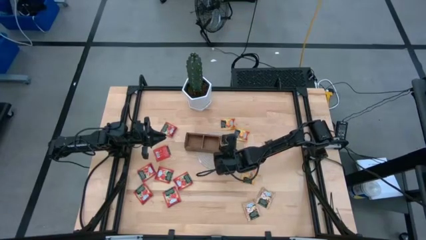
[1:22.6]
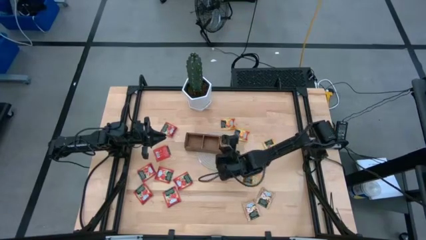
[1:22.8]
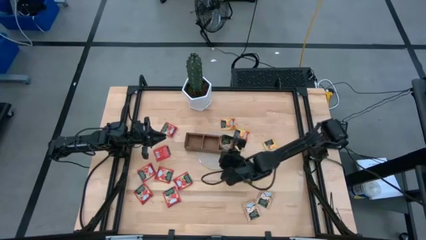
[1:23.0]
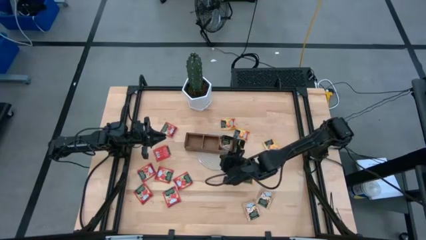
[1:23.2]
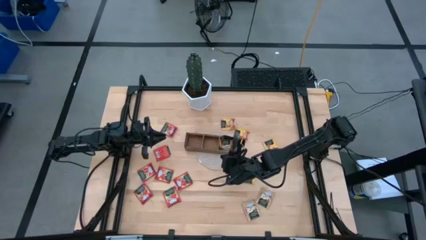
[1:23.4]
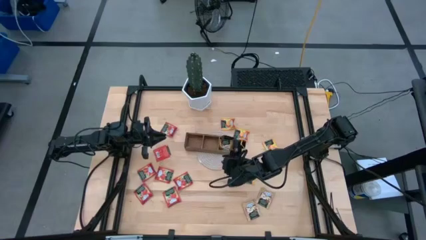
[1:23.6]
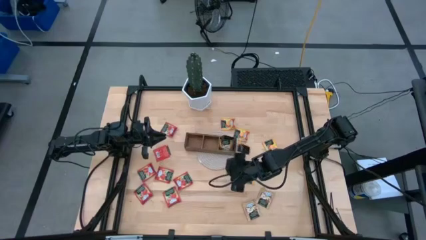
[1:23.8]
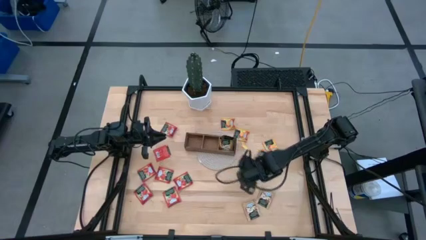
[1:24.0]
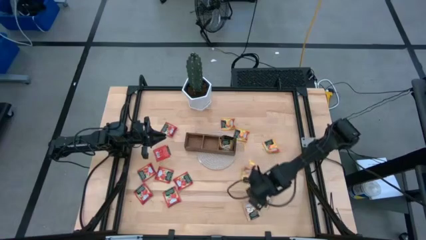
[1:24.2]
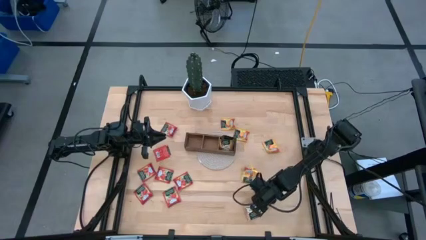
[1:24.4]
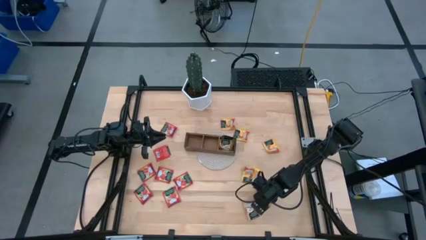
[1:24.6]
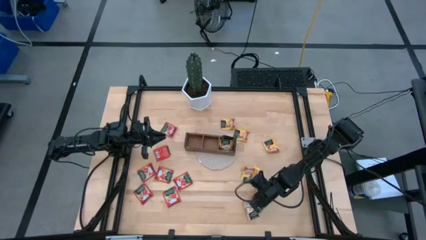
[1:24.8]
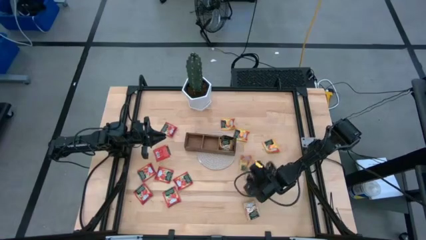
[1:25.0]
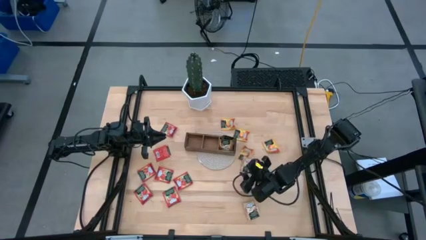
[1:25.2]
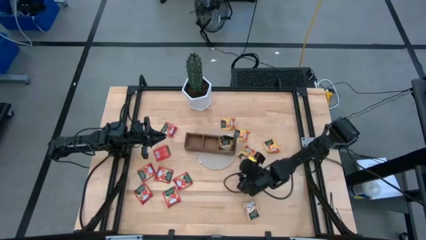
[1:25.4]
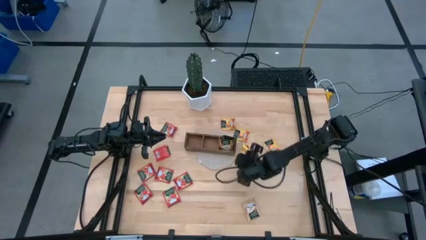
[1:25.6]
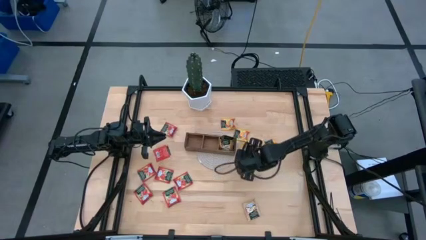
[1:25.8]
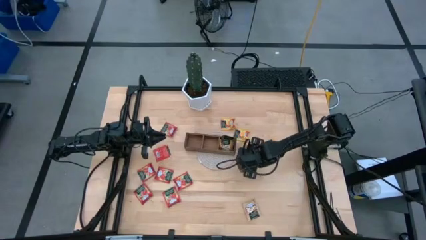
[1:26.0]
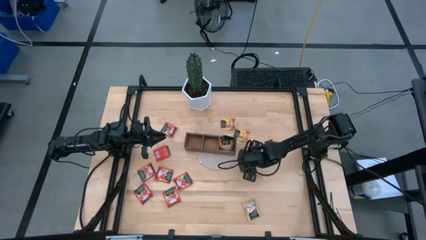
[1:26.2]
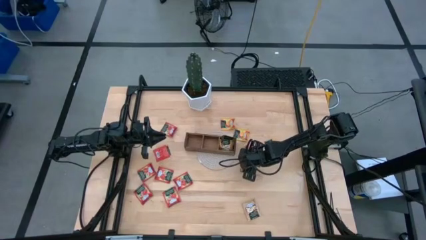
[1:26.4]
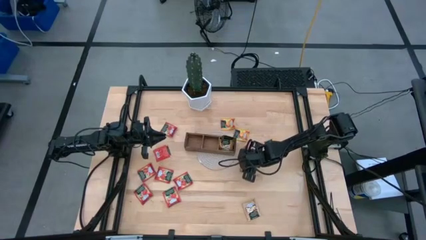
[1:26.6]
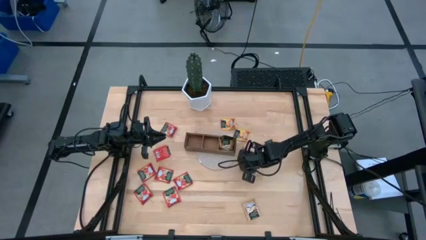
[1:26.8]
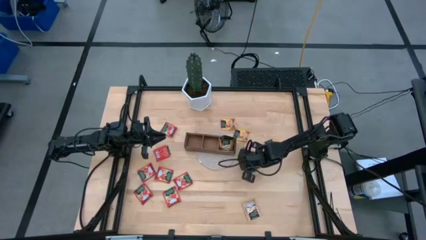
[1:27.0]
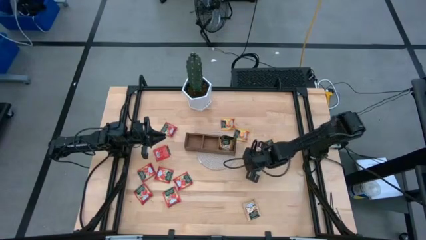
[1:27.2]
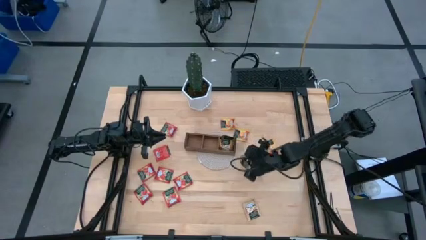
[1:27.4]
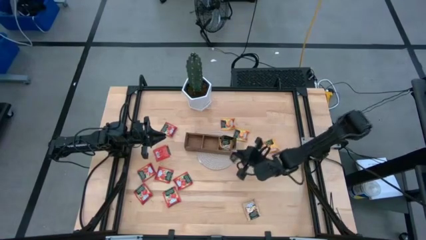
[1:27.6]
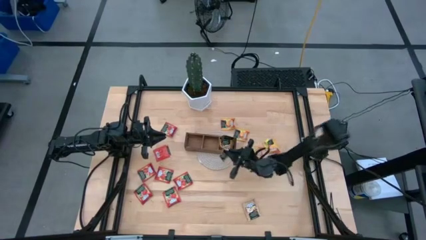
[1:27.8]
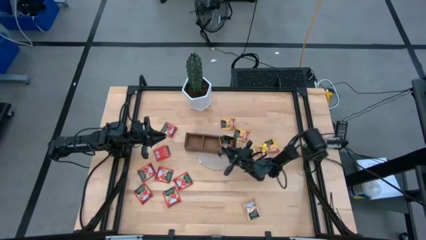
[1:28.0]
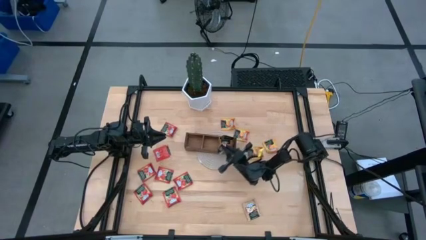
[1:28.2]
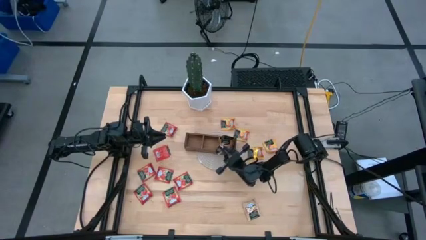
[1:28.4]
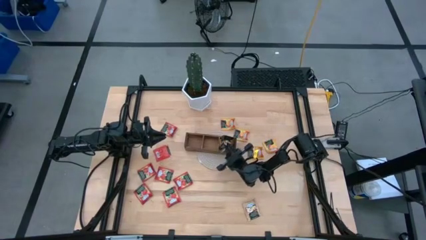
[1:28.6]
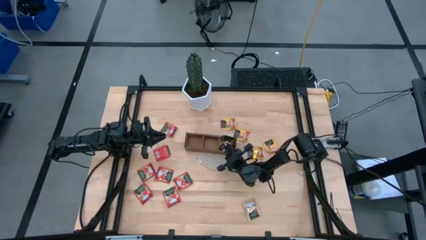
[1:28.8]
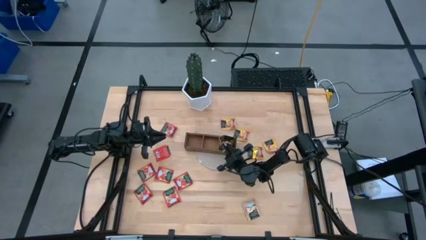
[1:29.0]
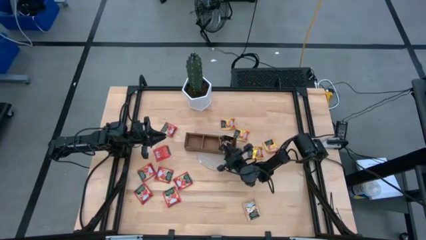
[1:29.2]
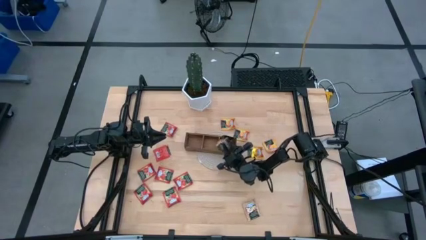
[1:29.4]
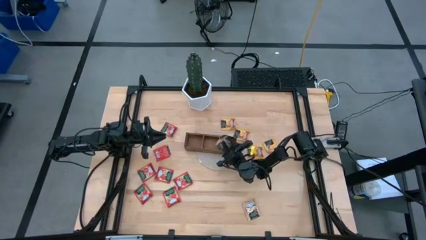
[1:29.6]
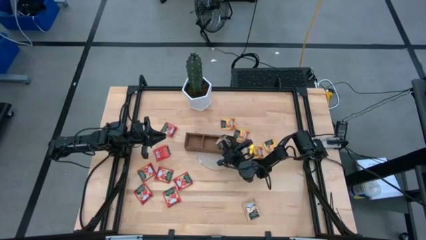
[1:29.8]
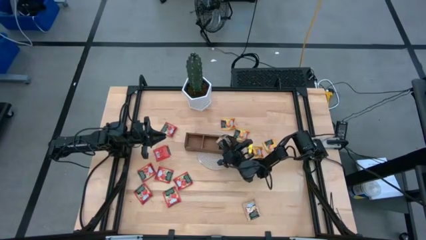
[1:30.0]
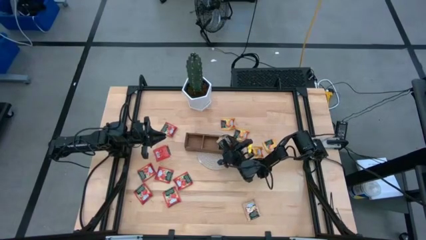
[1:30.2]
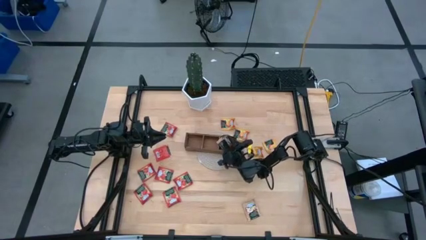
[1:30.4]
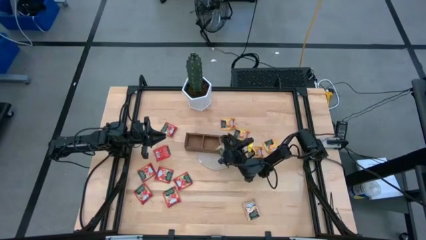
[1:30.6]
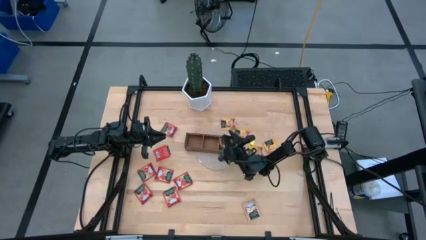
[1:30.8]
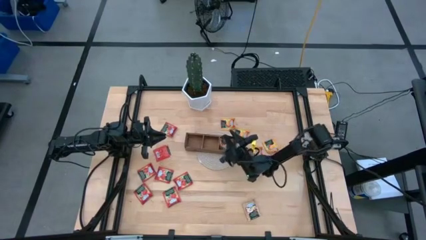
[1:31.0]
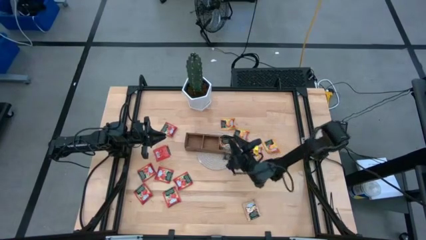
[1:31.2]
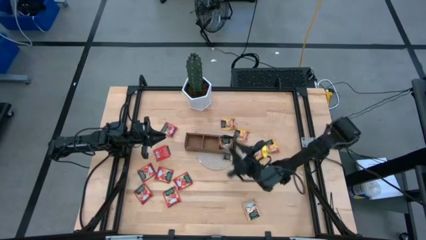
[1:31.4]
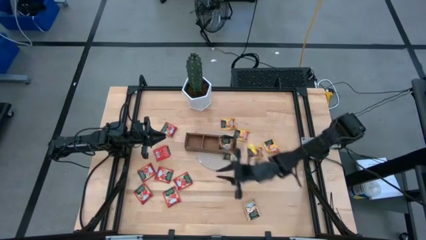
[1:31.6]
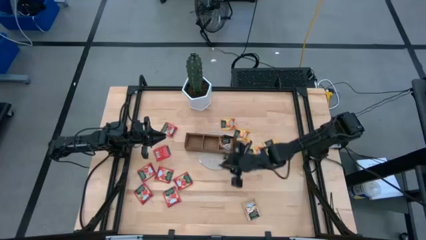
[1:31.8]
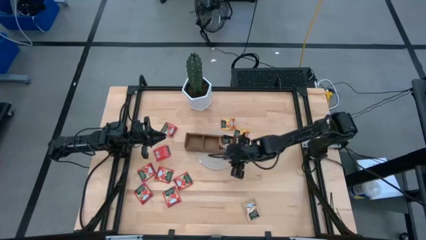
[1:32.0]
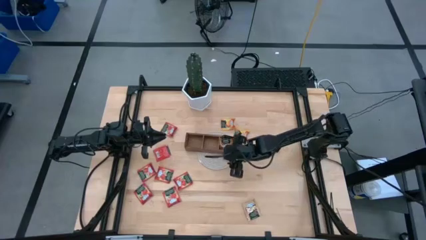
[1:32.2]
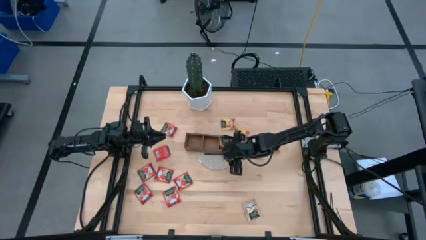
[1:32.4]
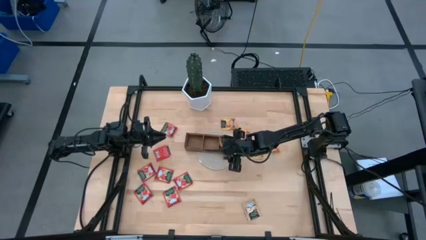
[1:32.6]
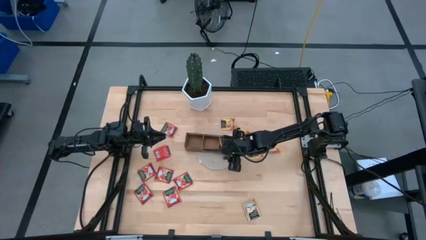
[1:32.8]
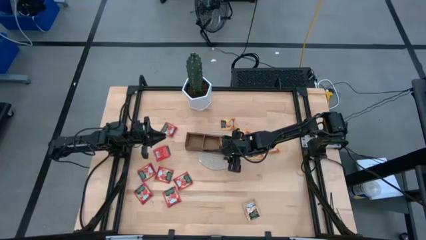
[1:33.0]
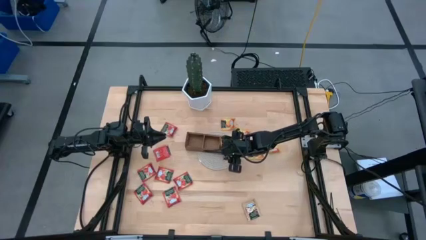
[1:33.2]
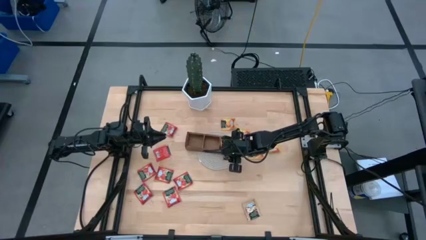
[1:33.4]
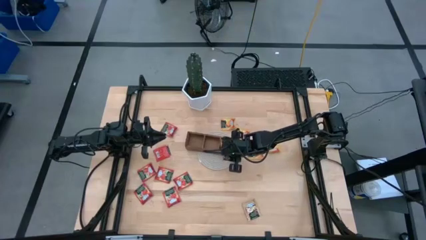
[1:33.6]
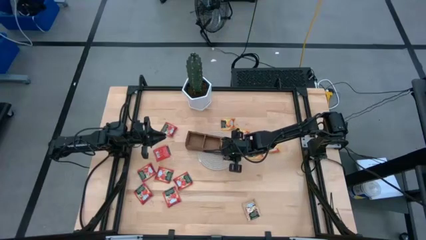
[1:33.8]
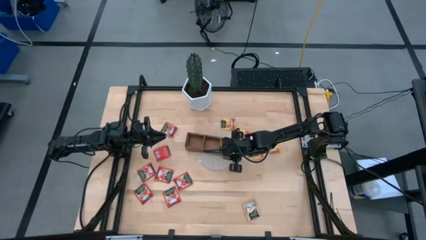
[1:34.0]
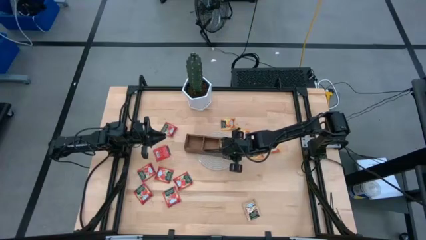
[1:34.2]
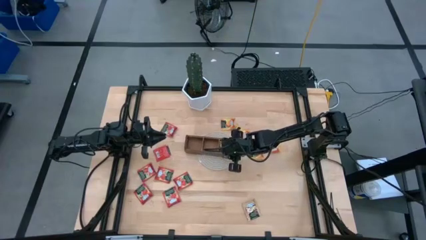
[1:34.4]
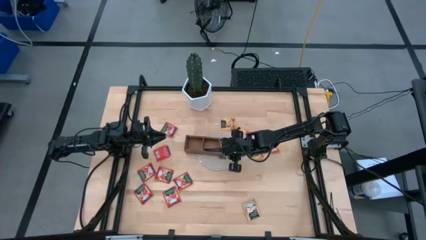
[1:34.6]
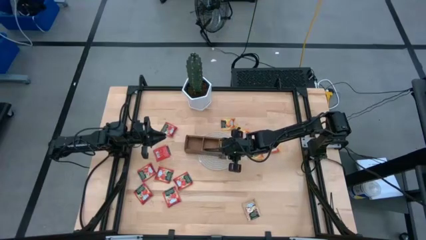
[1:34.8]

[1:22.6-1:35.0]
Task: Pick & Place Tea
Put the brown tea bag into the right section of the wooden organizer

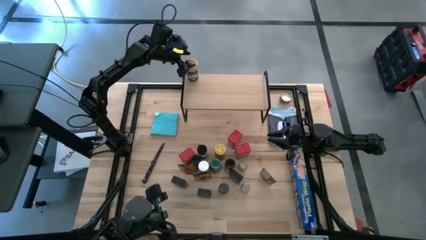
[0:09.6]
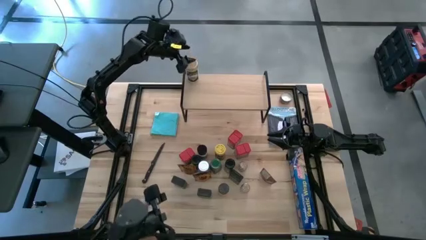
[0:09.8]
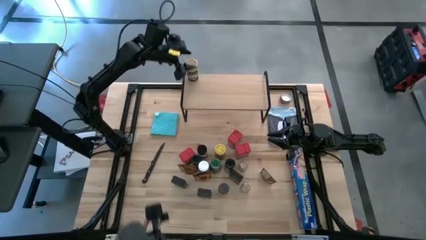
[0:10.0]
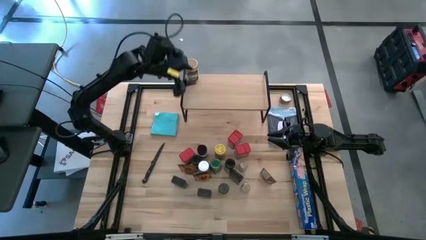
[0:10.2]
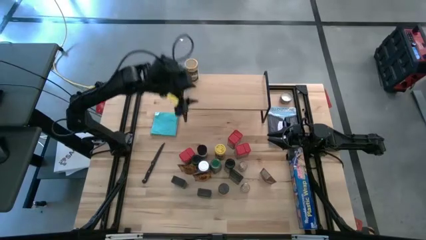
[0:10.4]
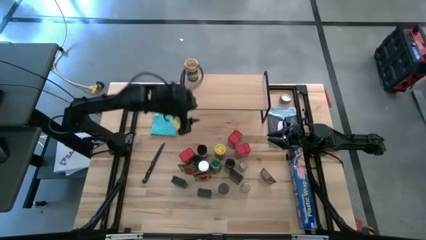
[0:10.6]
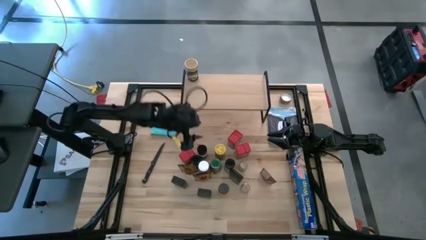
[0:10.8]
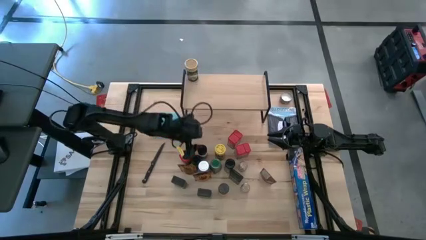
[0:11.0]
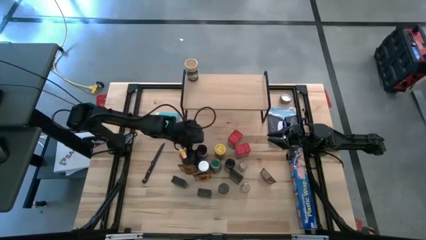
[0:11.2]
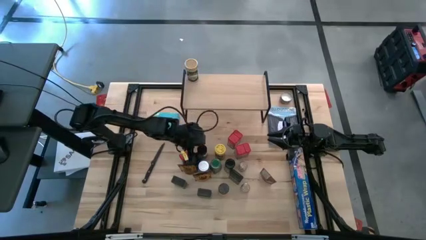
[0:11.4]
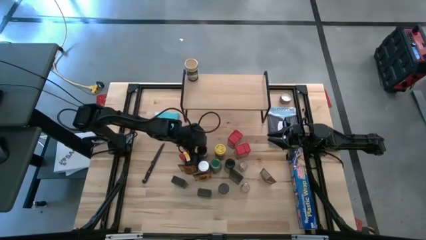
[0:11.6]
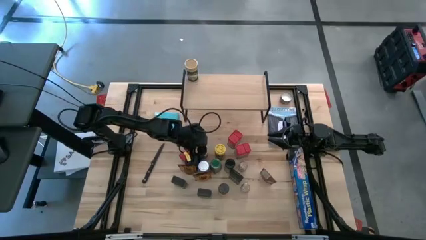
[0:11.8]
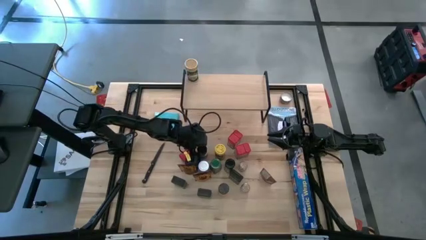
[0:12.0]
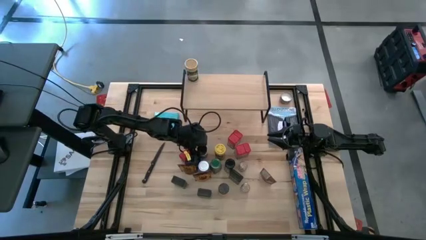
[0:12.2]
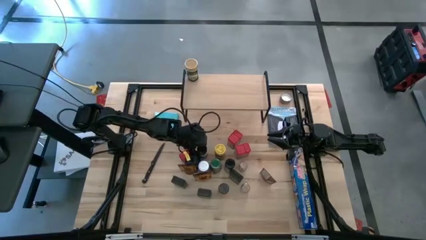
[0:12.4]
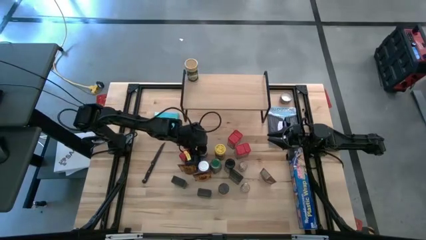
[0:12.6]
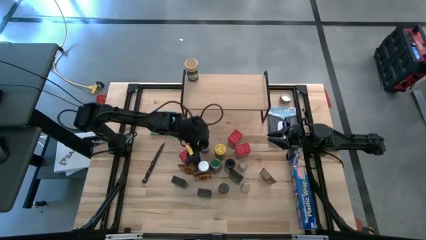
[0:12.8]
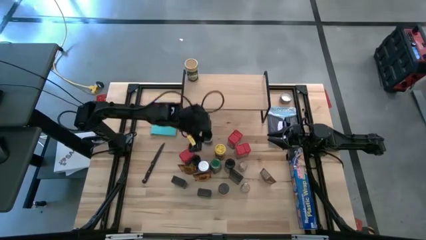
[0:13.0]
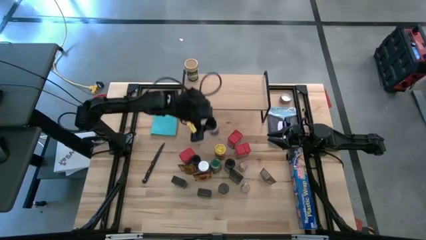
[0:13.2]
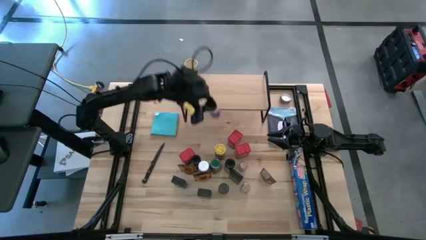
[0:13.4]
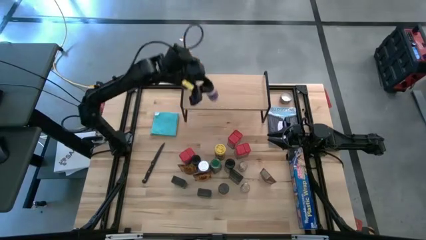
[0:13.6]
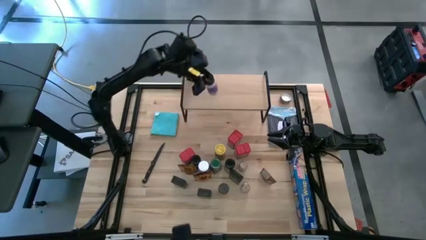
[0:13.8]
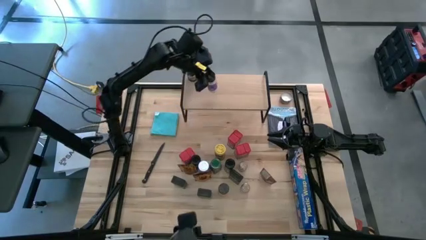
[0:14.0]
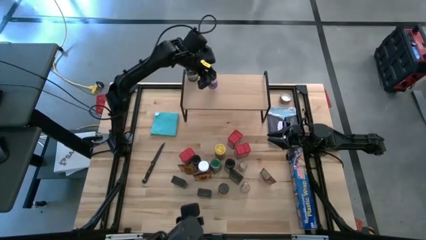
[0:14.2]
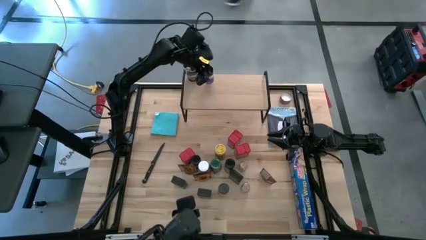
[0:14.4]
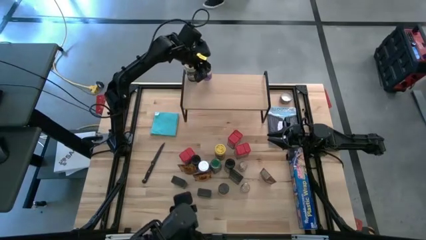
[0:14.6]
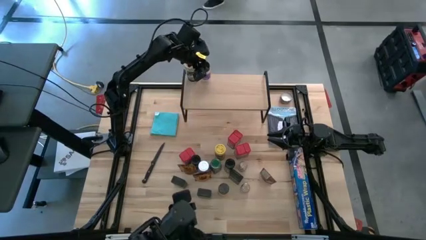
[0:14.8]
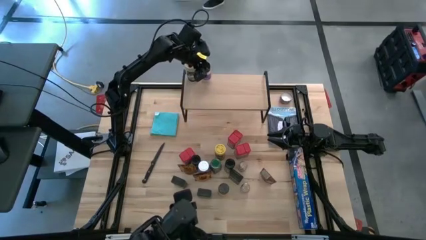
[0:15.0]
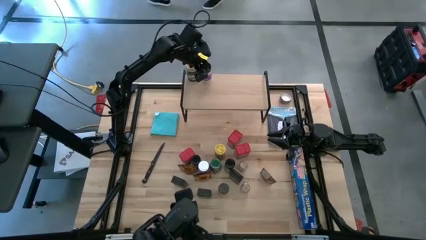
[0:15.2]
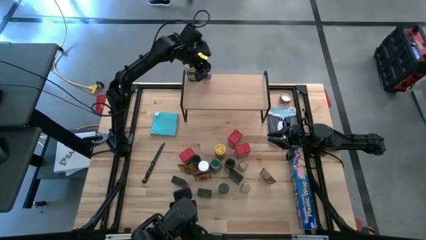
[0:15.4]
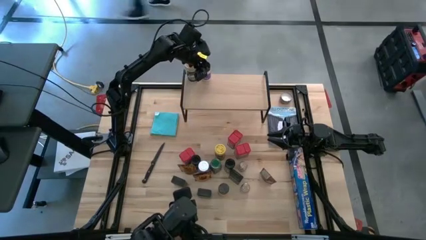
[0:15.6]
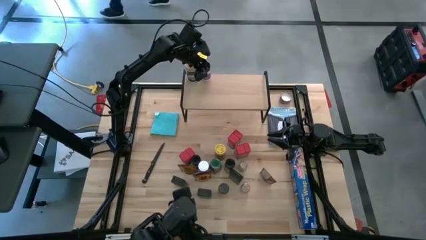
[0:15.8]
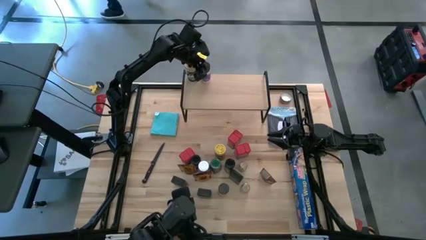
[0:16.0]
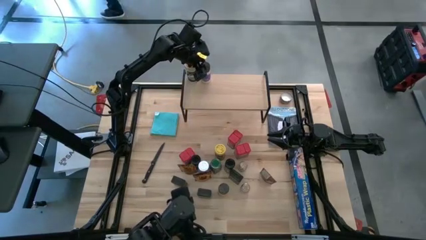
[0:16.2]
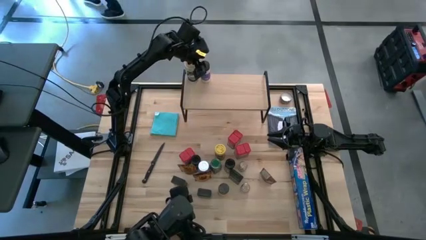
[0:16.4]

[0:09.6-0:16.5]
Task: Shelf spices
Put the black seasoning bottle on the shelf
